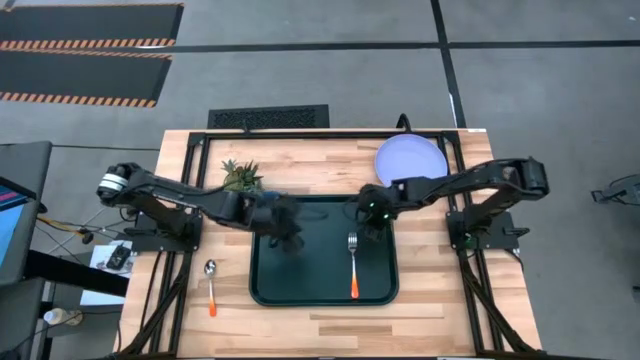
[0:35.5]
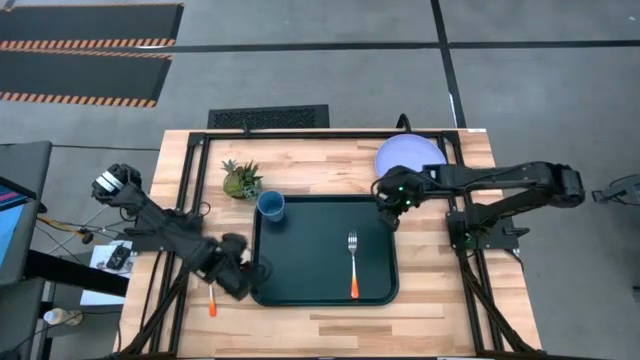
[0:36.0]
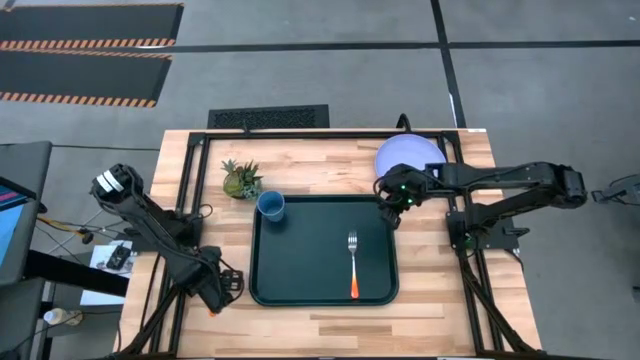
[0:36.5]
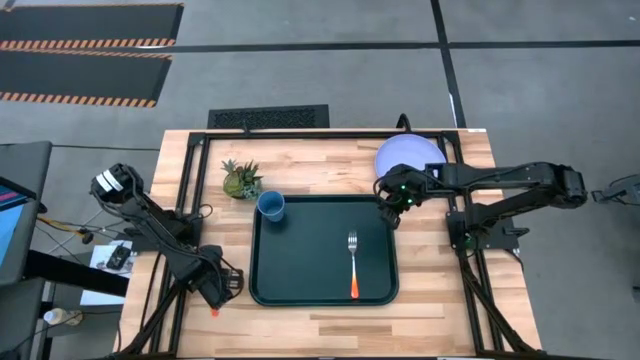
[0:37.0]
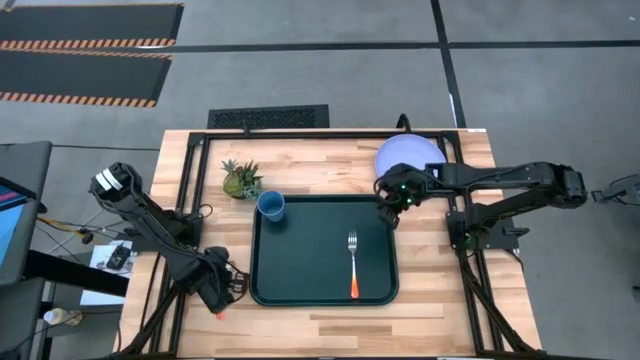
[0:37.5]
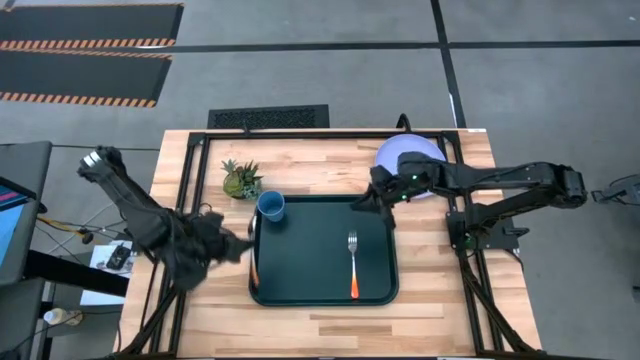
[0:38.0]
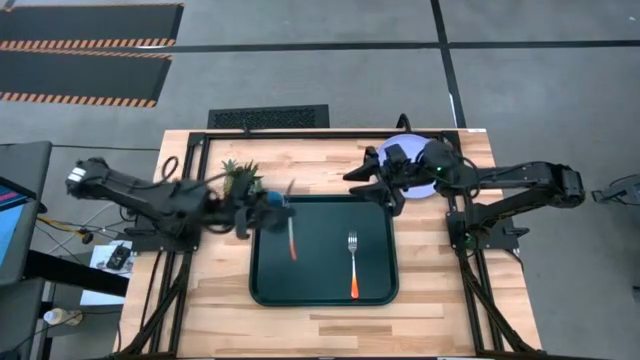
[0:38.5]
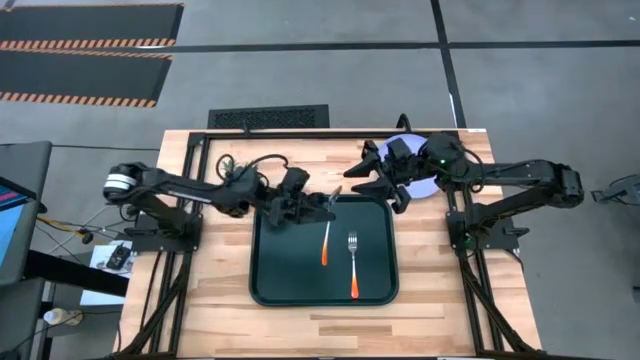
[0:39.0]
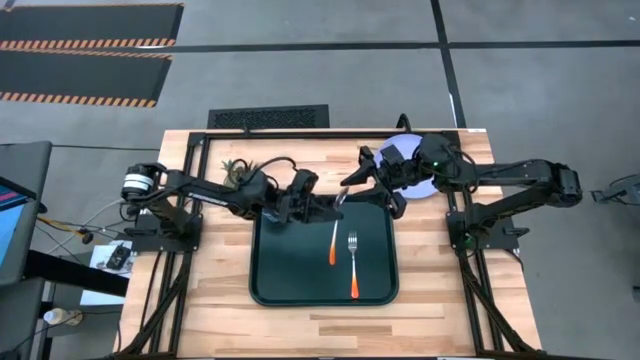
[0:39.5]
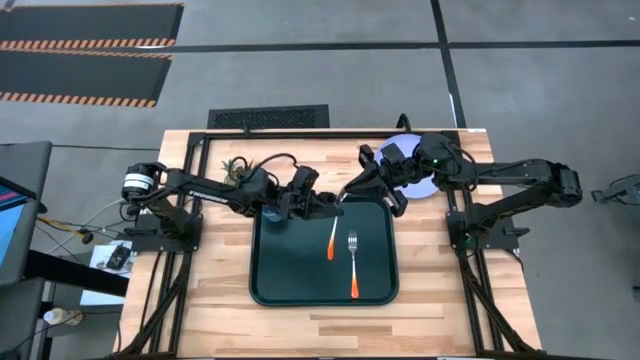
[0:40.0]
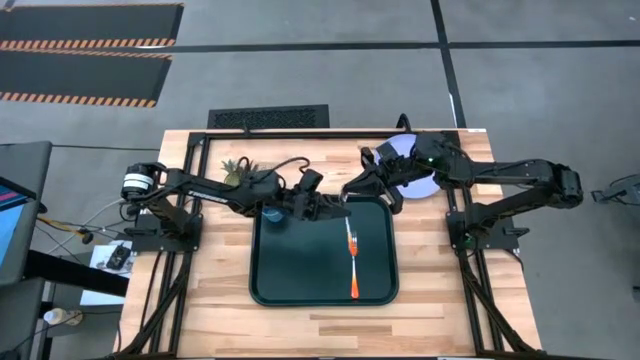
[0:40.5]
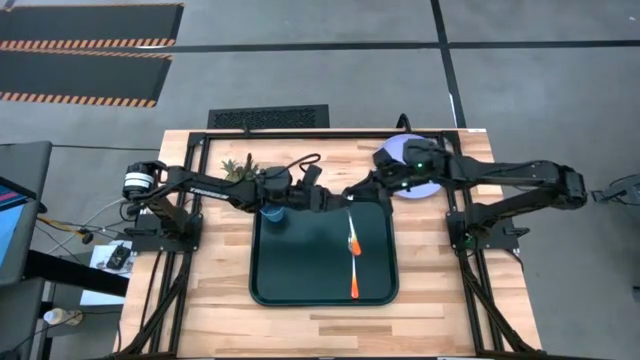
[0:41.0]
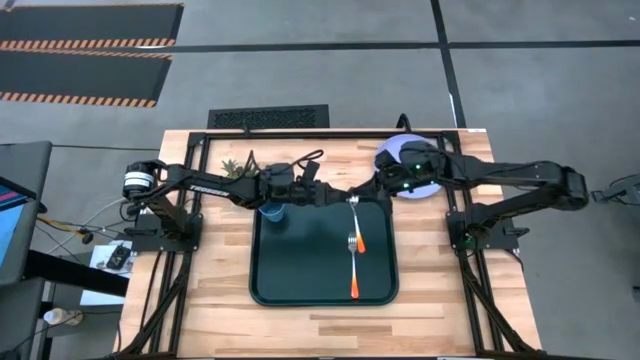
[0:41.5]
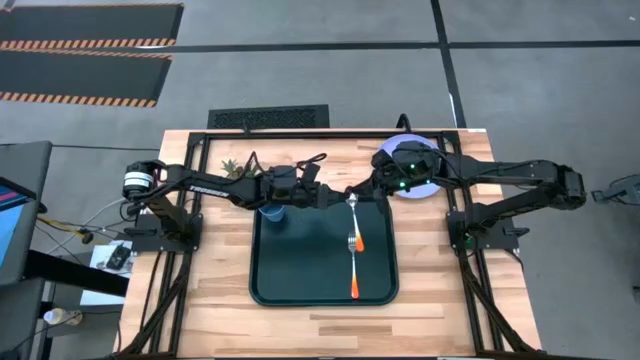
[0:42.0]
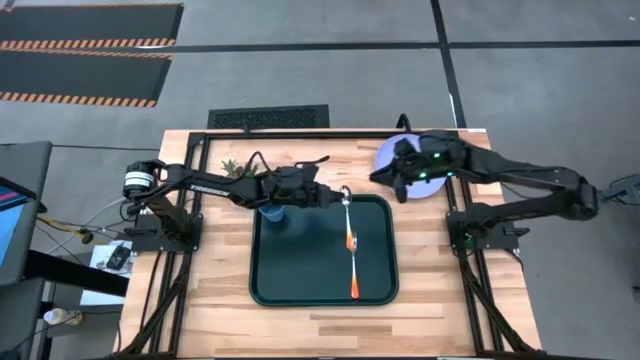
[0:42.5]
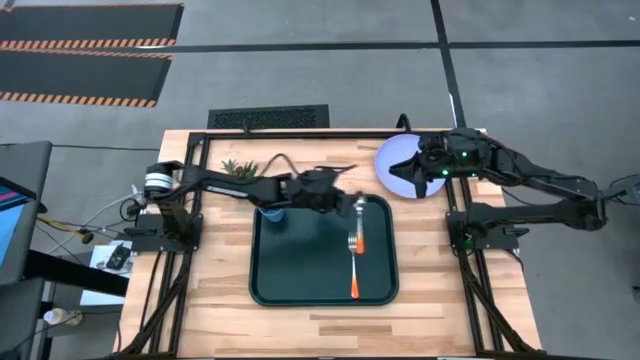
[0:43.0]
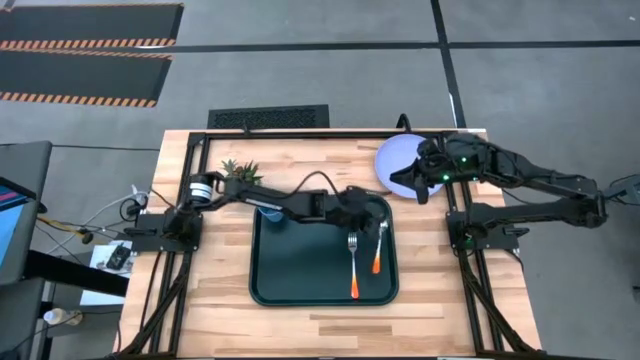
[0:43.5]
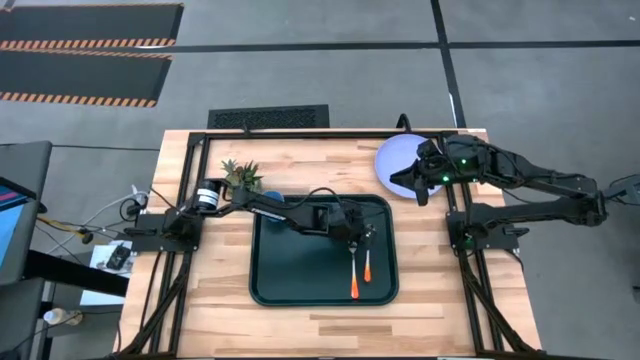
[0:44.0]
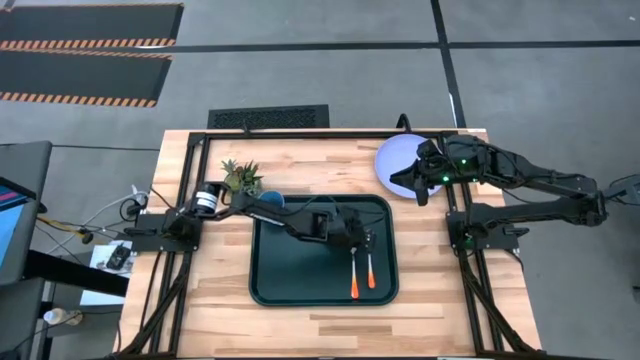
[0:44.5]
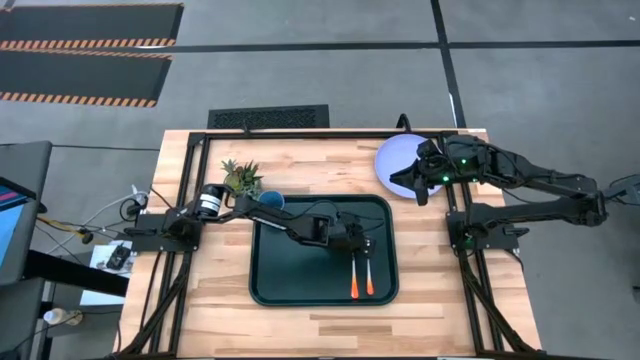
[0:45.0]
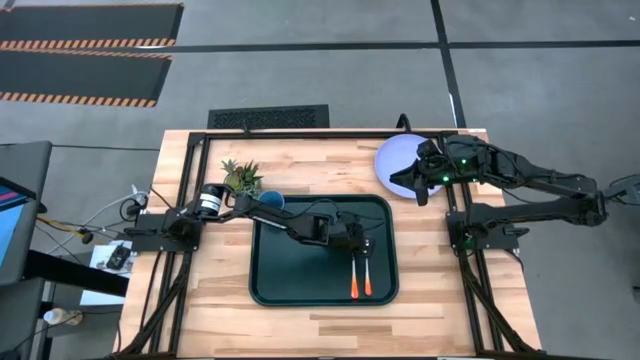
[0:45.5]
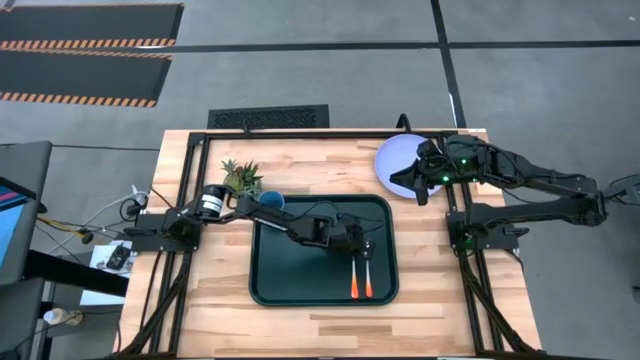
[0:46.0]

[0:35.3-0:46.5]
Task: Pick and place plate/cup/fork/spoon on tray
Put the orange spoon on the black tray to the right of the orange fork

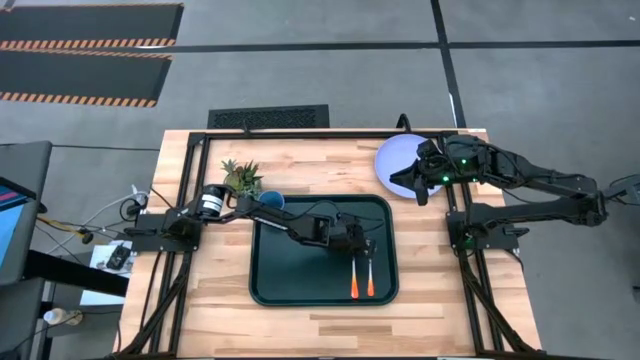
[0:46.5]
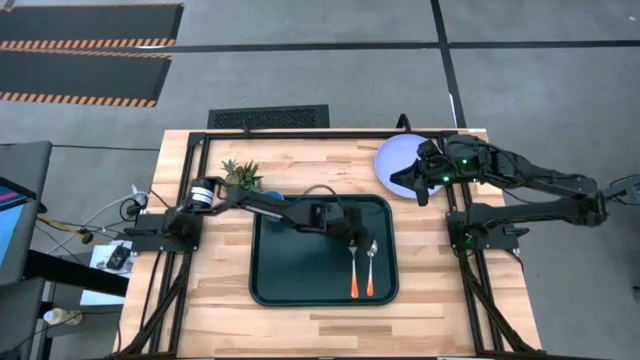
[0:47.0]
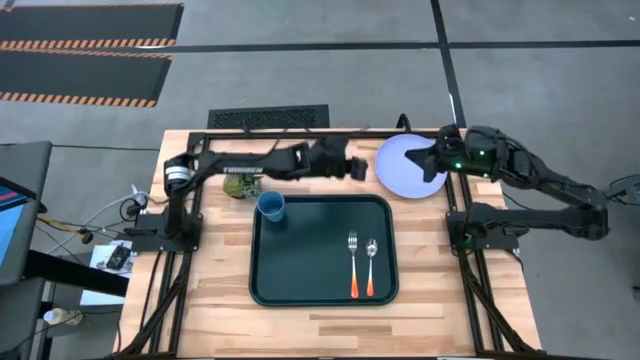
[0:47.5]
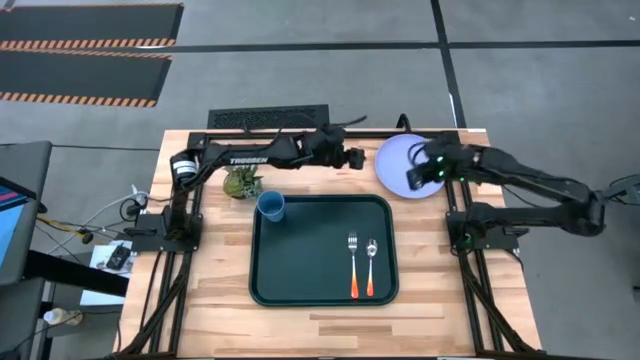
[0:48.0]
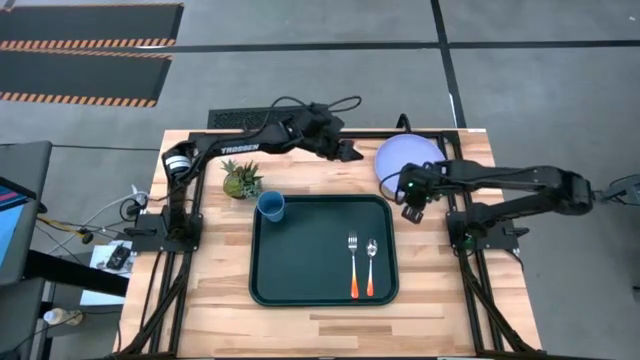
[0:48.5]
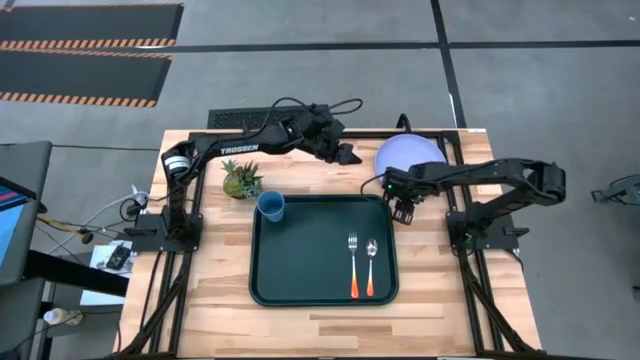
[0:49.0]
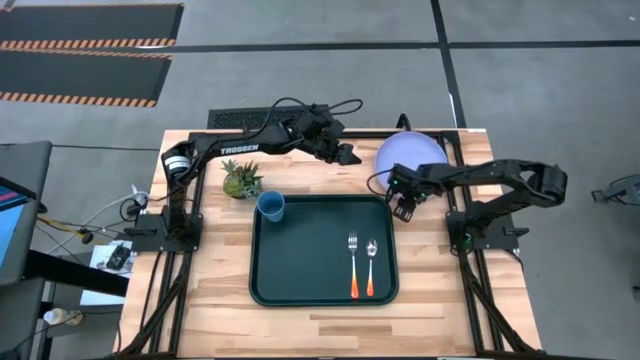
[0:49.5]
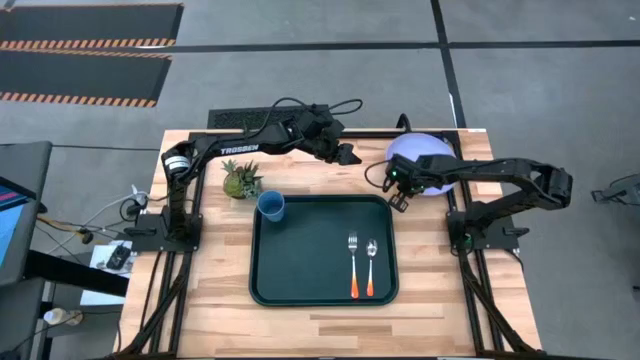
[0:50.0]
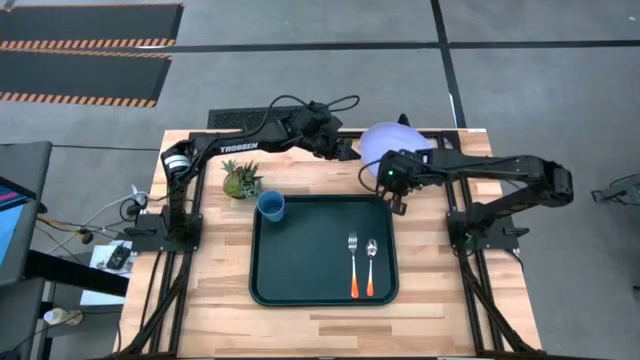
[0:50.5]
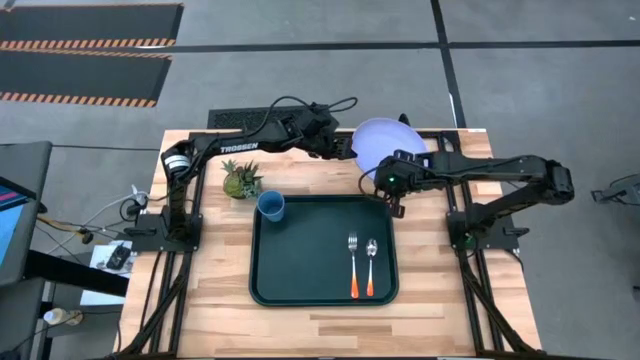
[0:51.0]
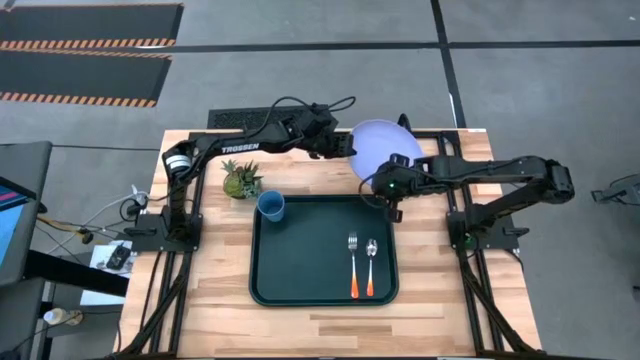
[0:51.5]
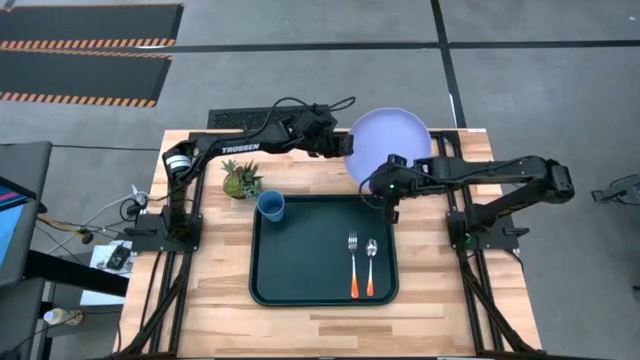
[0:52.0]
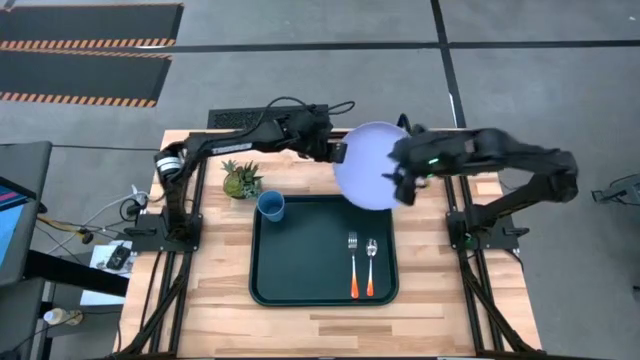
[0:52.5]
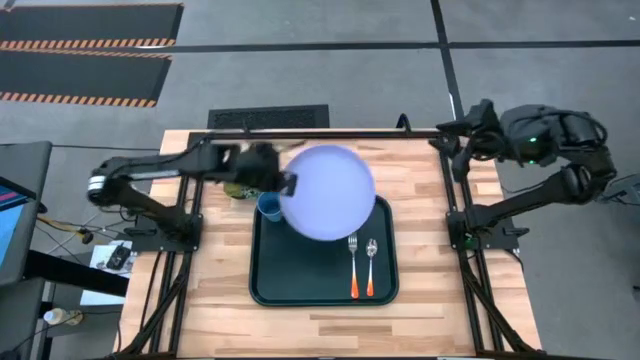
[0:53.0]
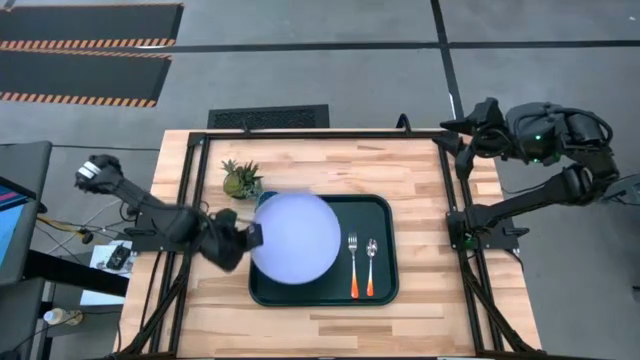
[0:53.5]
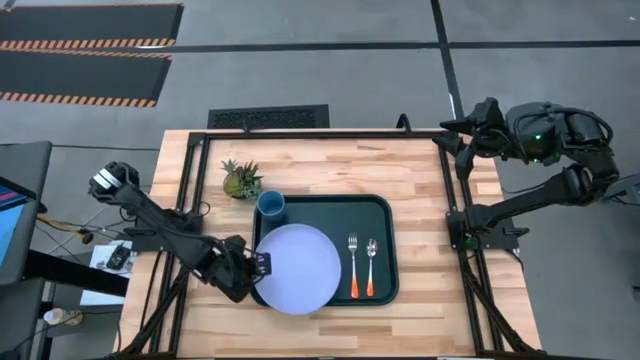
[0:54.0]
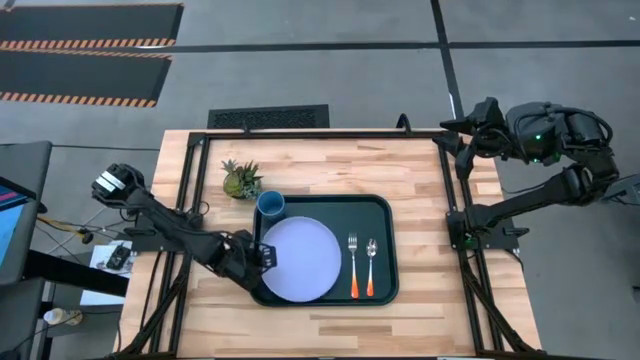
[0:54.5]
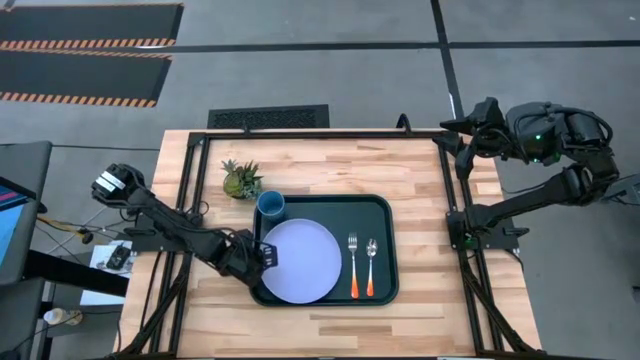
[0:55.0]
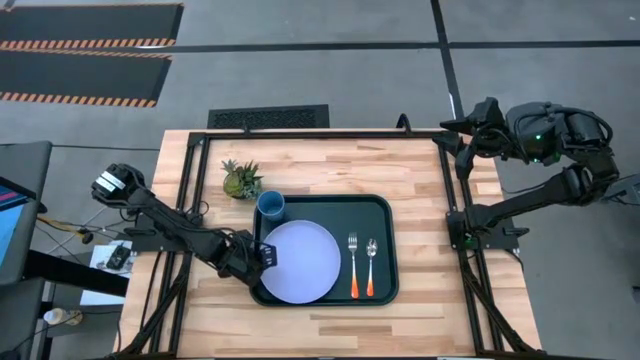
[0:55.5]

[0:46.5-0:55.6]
Put the purple plate on the black tray to the left of the orange fork

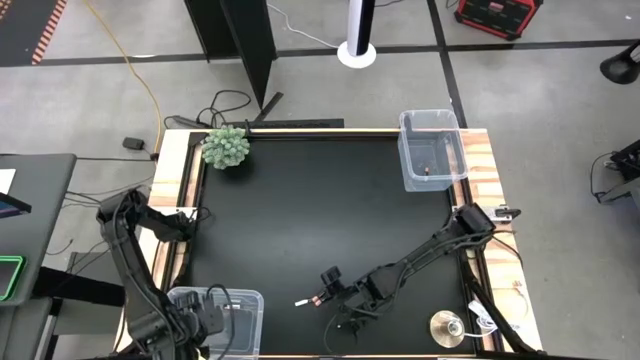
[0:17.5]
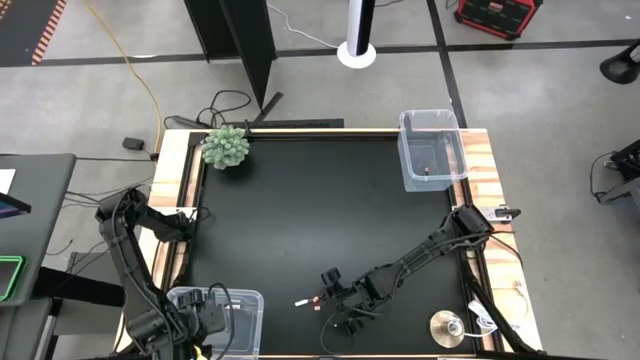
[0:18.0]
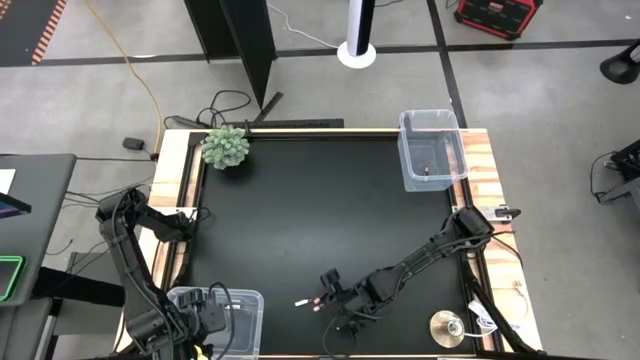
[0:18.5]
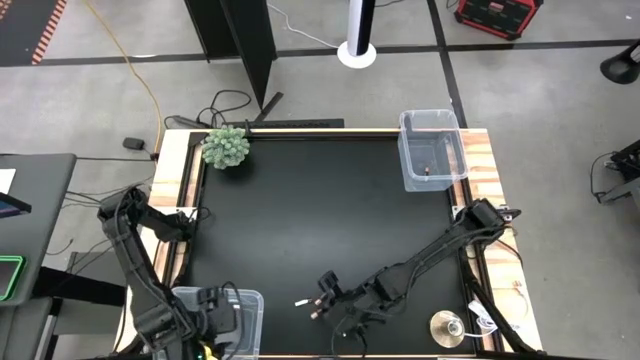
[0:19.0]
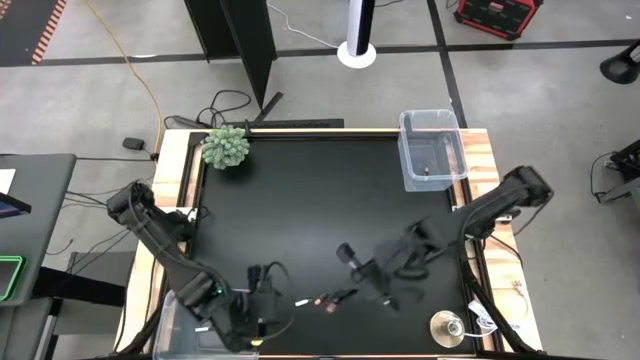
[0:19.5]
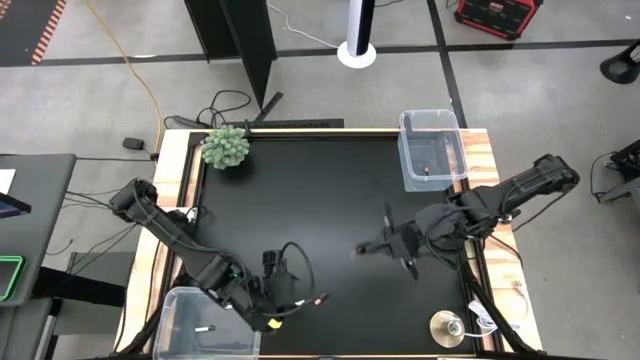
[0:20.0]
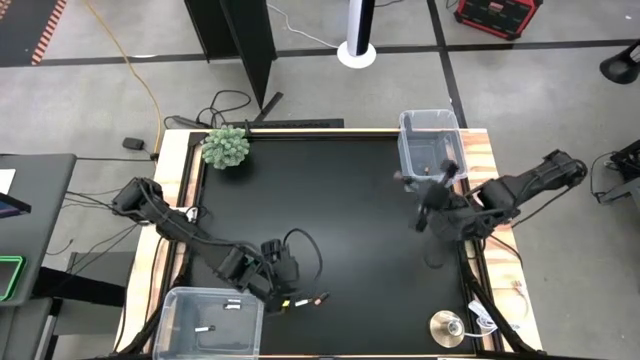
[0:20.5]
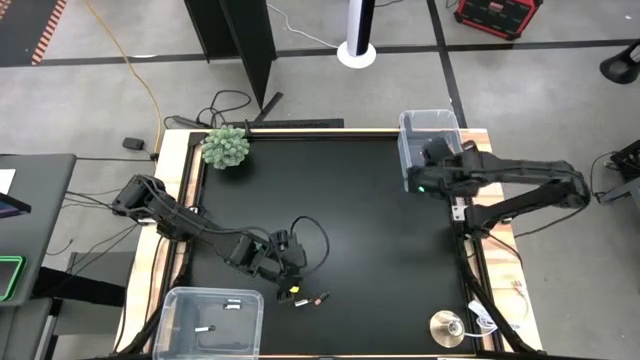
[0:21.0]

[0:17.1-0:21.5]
Task: Sort batteries
Put the bottom black battery into the top transparent bin
